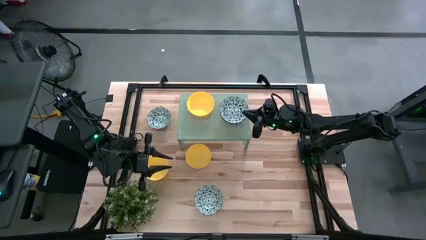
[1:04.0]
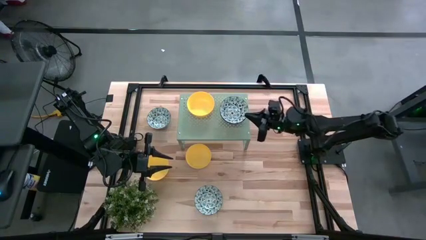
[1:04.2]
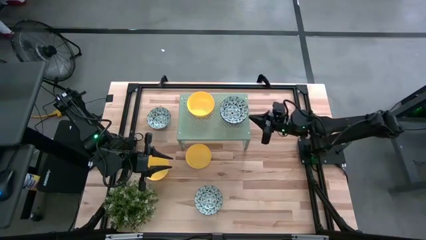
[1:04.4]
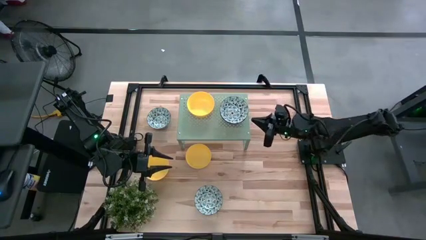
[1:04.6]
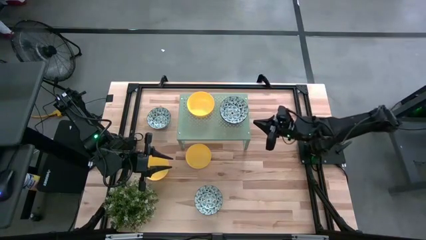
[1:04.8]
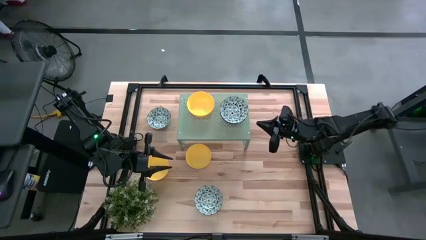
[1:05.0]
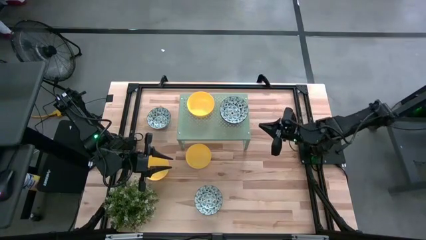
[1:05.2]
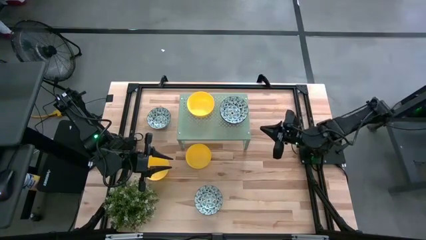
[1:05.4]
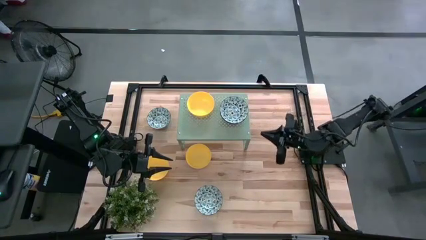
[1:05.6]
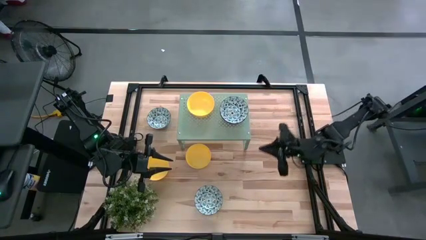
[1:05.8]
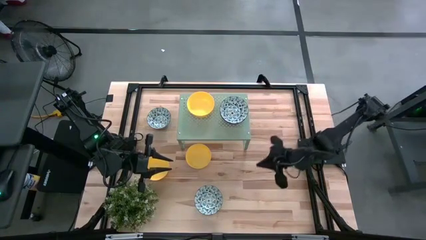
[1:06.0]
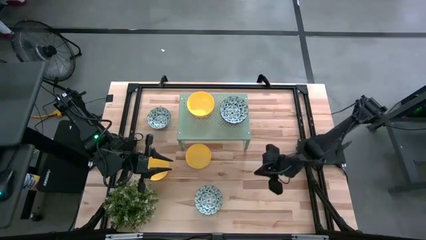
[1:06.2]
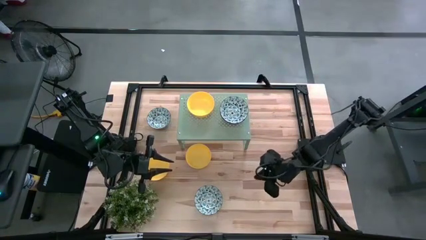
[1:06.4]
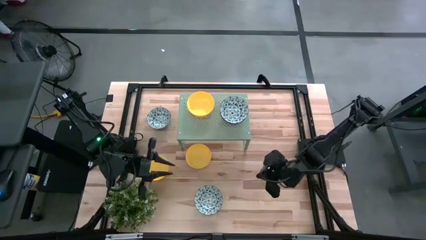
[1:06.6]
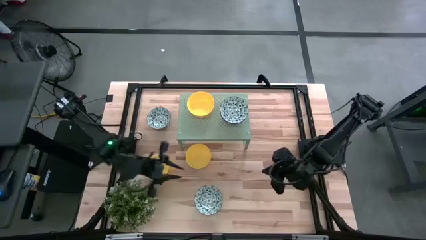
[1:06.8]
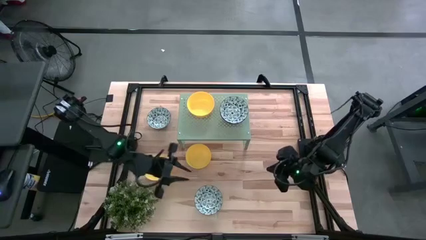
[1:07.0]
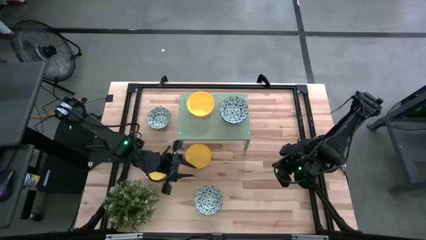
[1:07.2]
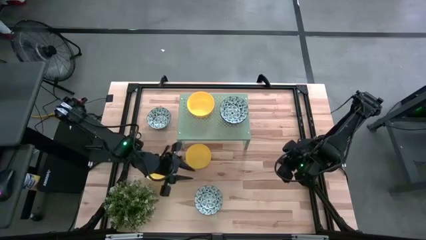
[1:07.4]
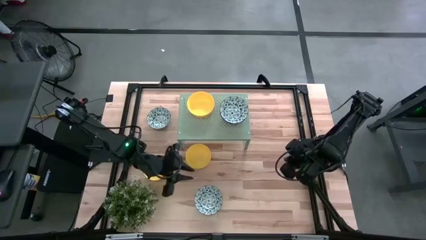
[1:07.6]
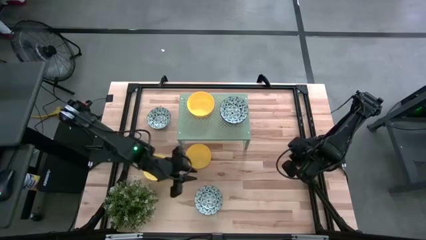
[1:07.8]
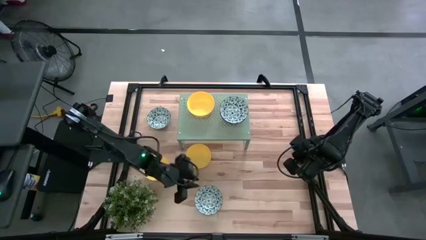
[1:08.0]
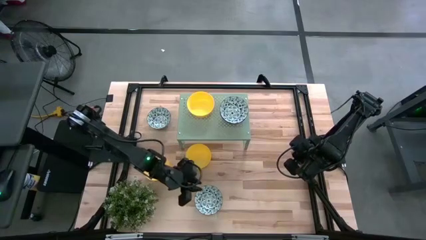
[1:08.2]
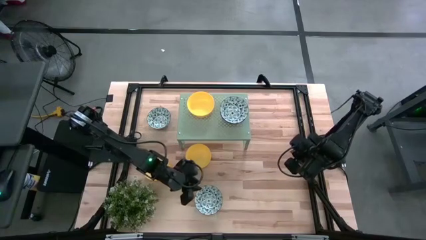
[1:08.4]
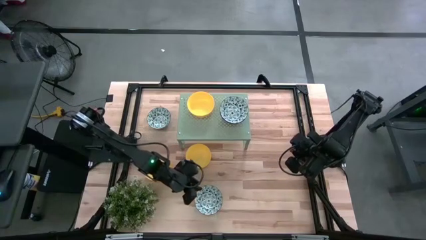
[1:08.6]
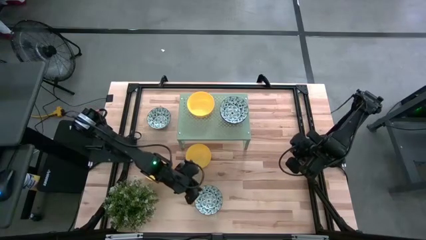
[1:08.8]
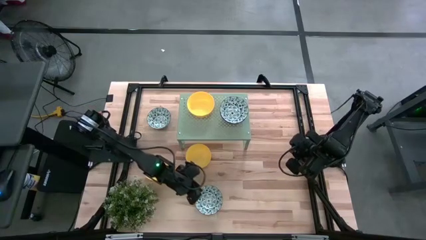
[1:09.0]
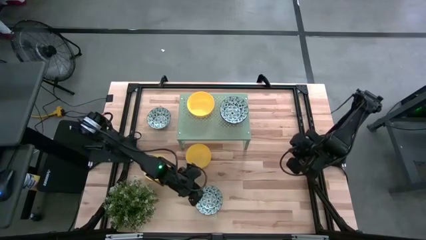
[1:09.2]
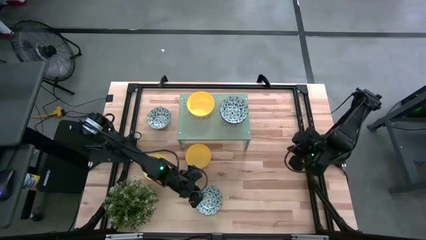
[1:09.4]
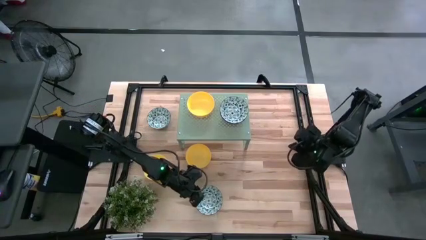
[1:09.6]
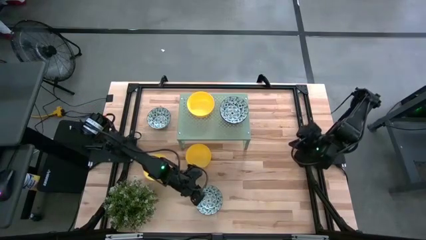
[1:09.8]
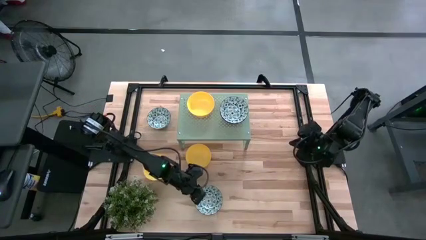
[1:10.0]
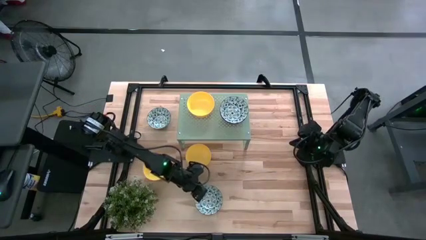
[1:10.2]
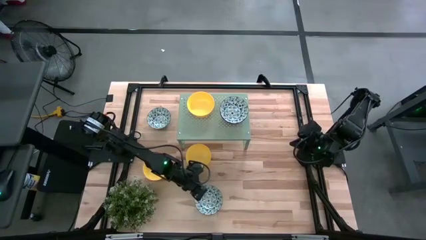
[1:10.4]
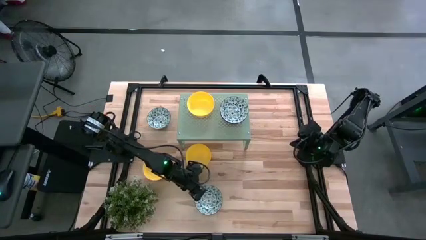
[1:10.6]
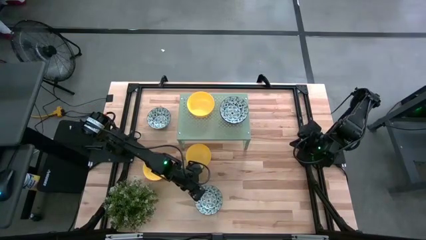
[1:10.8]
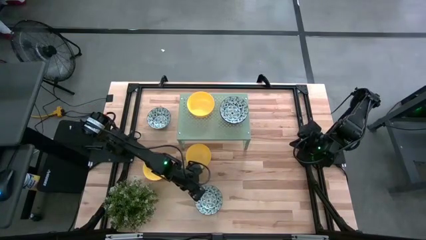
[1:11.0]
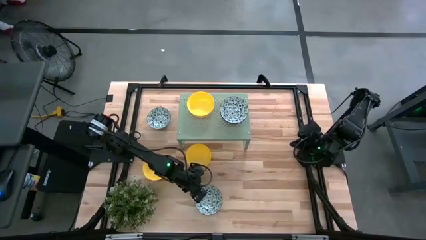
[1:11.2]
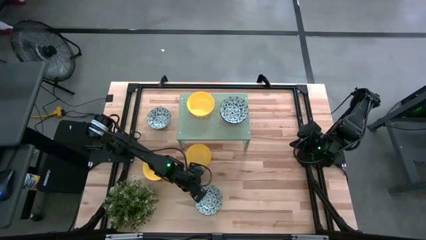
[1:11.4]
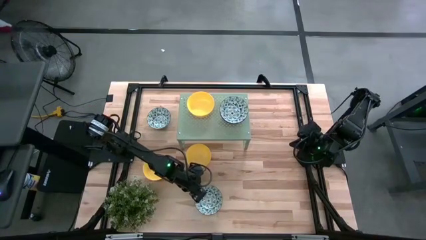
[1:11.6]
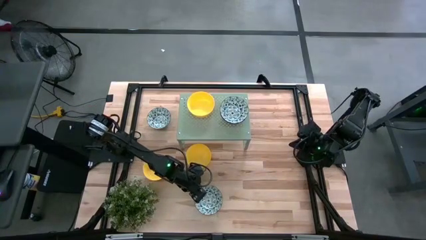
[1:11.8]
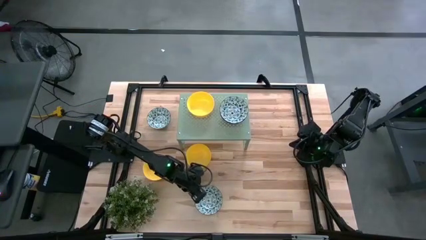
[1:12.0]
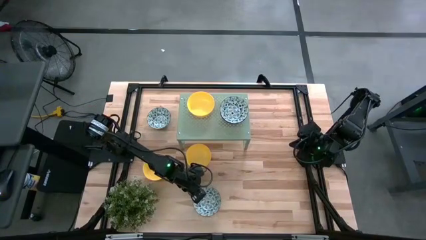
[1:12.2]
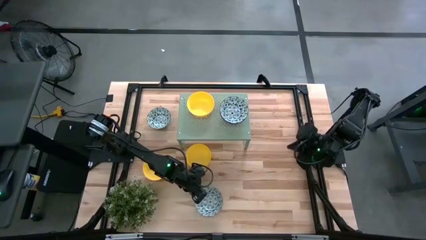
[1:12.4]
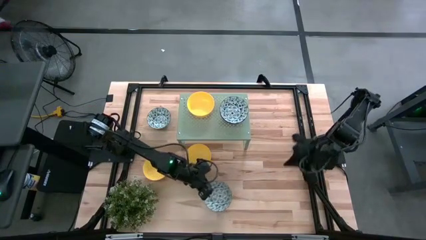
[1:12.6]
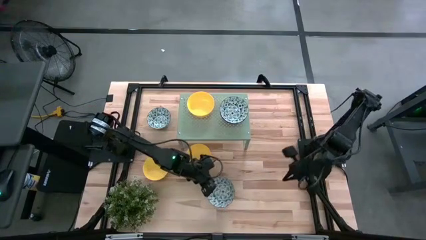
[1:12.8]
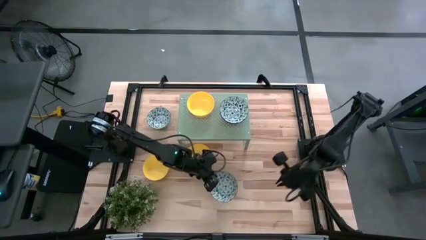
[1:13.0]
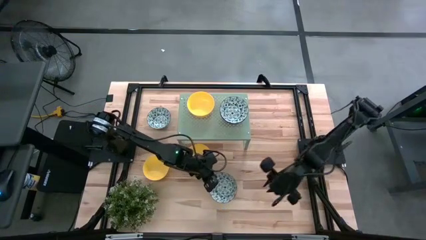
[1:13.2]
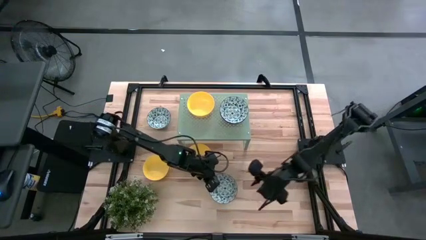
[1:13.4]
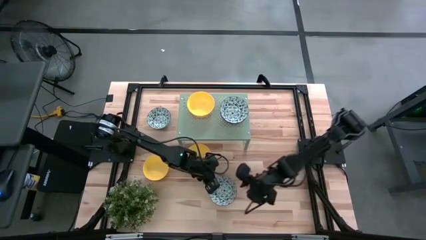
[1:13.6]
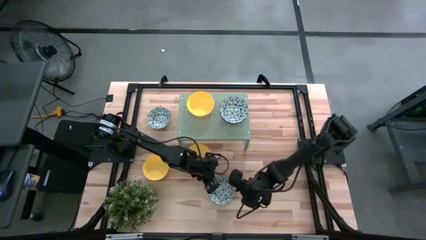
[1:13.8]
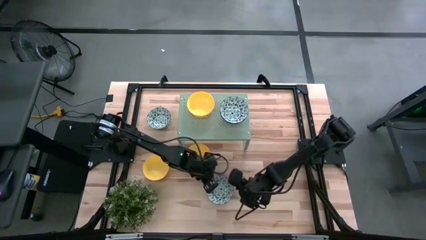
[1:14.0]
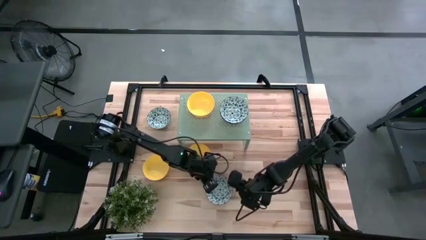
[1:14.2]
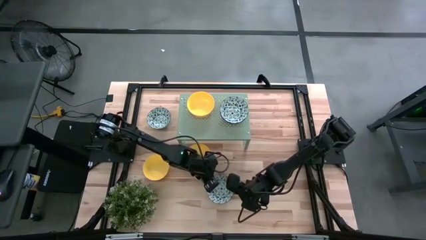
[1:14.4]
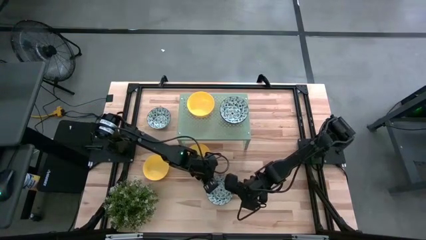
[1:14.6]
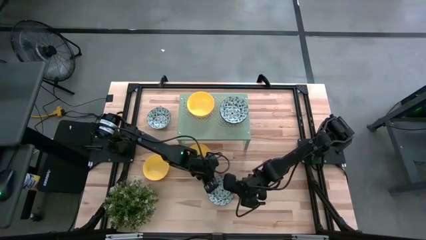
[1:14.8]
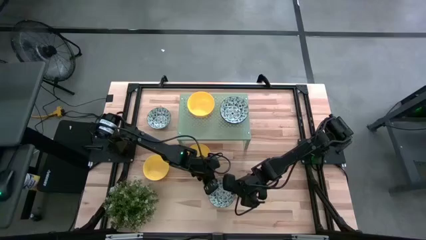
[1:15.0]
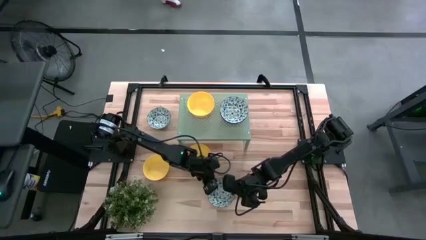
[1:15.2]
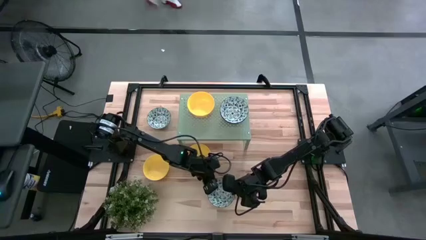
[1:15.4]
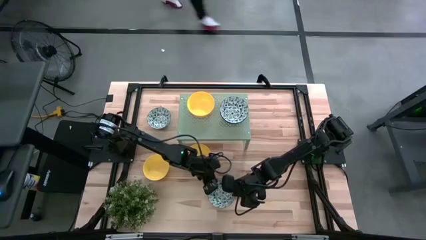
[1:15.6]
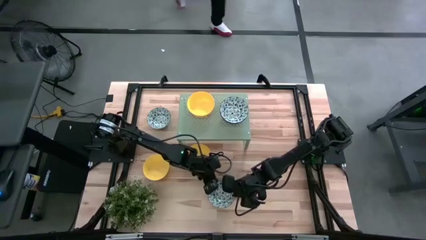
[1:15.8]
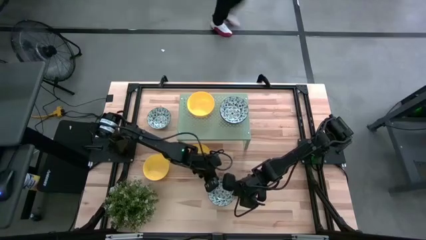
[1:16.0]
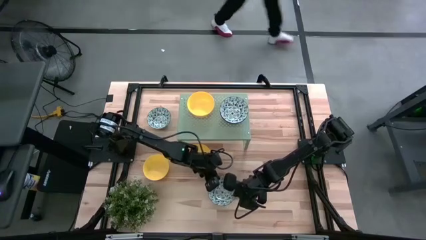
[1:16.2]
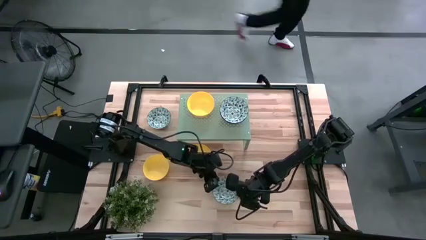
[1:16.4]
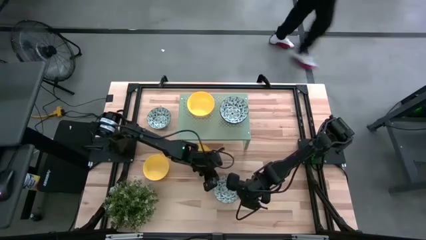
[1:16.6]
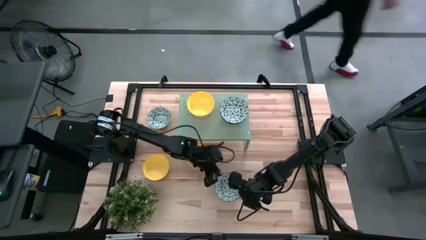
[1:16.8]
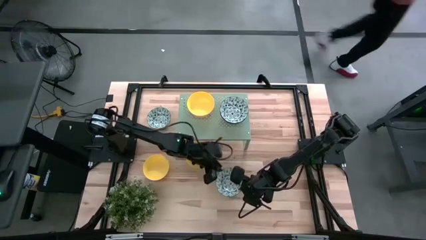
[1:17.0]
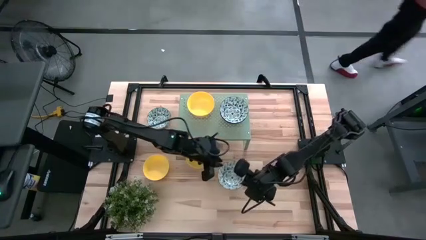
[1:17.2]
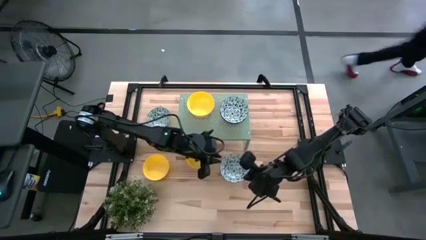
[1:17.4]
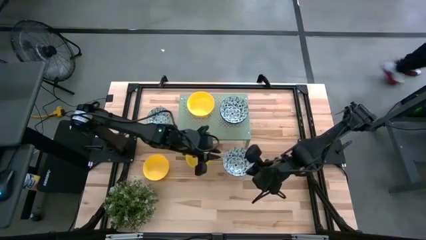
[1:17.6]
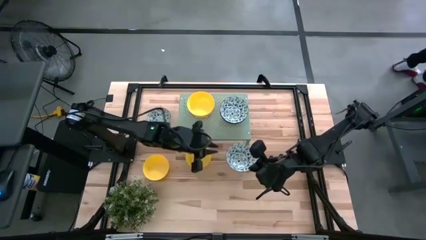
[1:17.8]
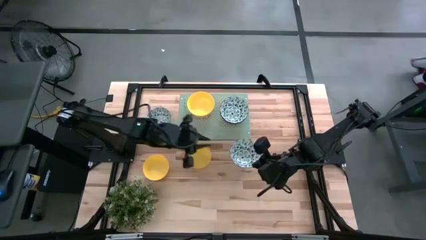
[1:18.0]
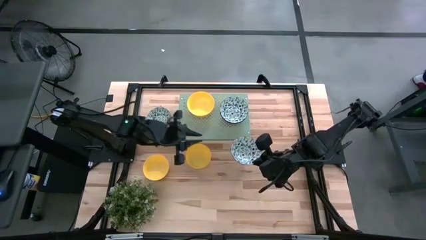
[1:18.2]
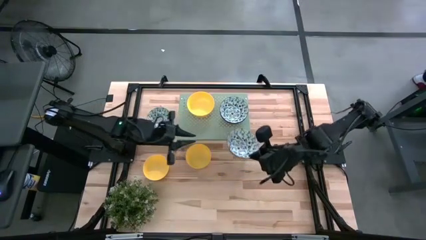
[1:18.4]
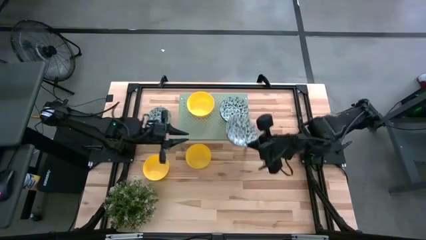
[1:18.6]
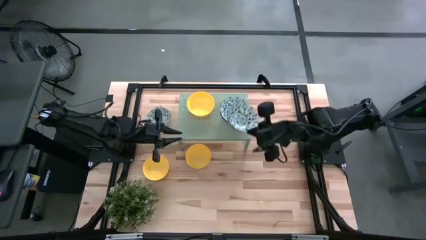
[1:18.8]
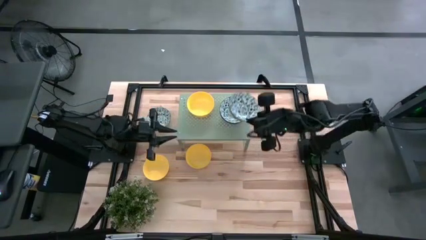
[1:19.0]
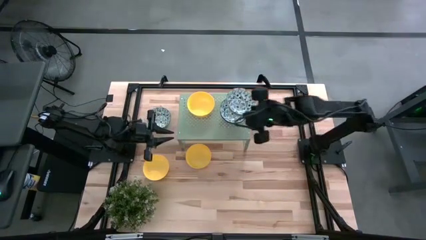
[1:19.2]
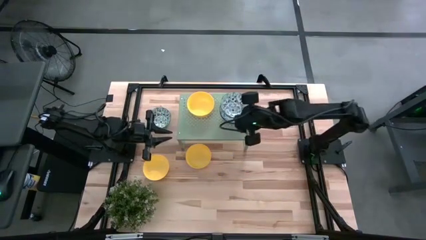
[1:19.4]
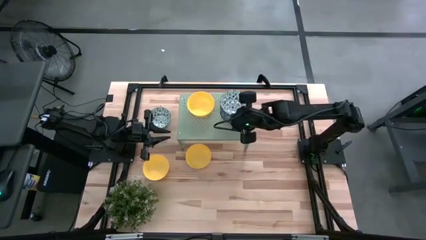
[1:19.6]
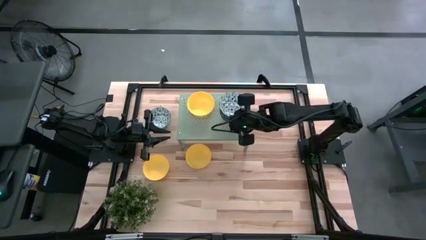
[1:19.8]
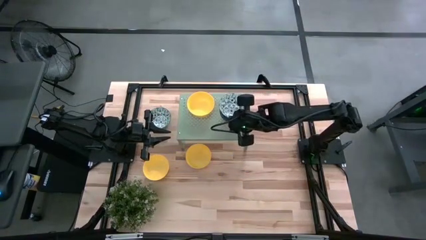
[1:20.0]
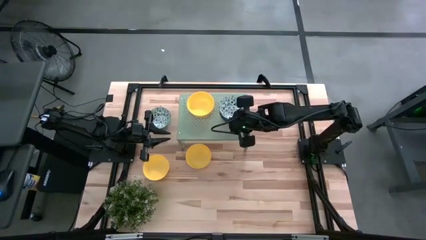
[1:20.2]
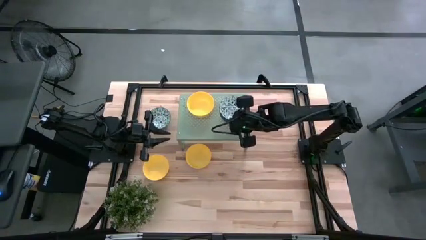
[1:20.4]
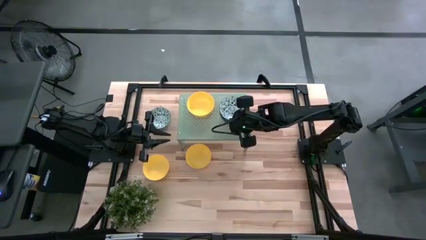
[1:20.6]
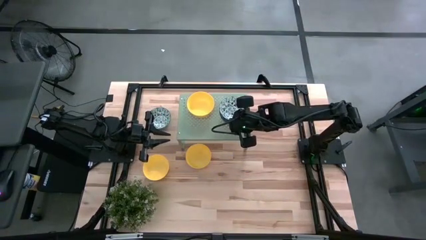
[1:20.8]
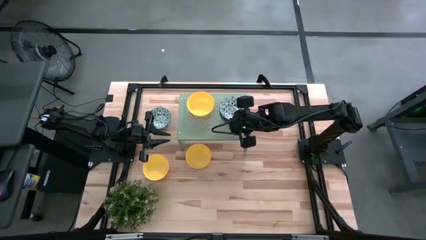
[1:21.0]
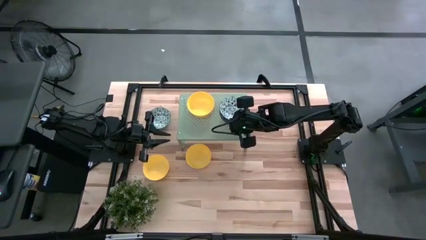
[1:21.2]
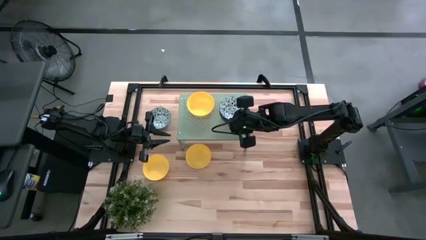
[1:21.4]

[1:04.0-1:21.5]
Task: Pick & Place Mini bowls
Stack the blue bowl on top of the blue bowls on the shelf
